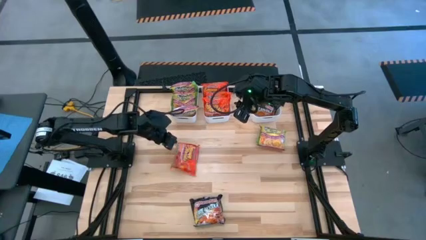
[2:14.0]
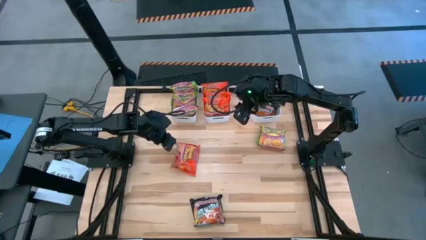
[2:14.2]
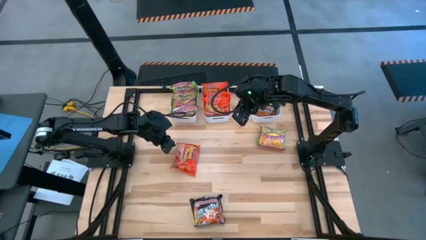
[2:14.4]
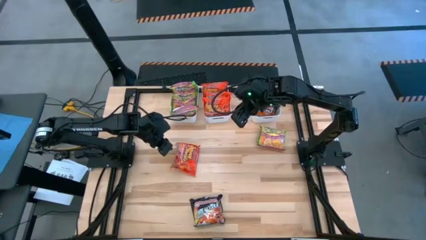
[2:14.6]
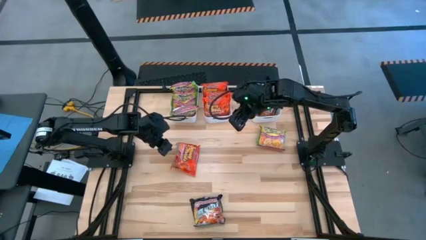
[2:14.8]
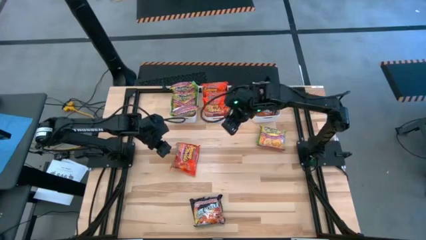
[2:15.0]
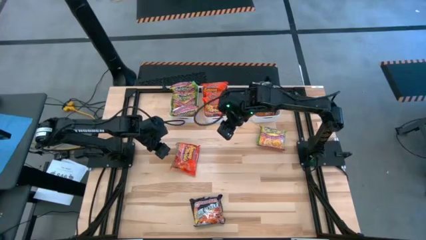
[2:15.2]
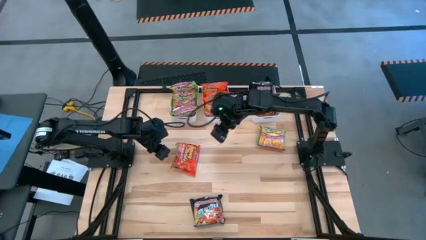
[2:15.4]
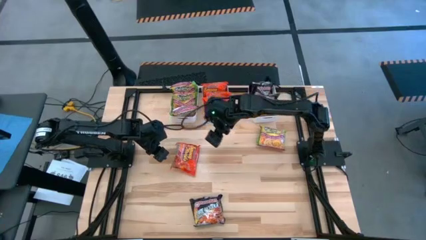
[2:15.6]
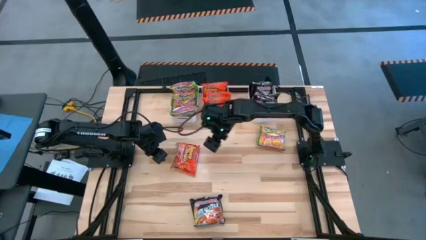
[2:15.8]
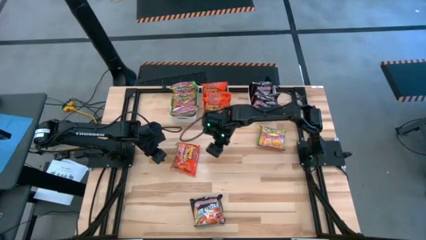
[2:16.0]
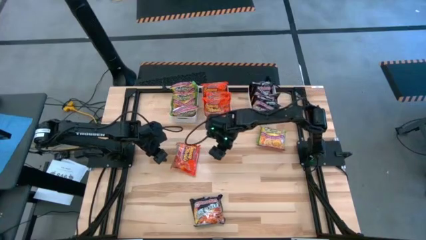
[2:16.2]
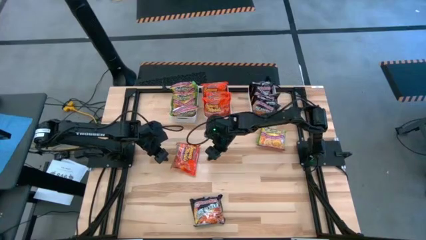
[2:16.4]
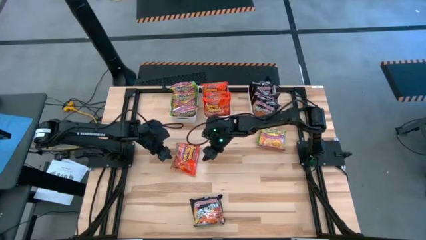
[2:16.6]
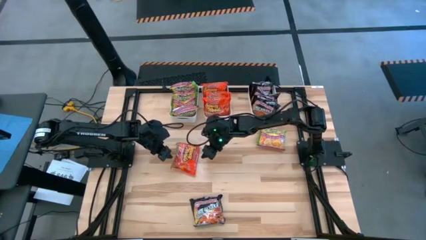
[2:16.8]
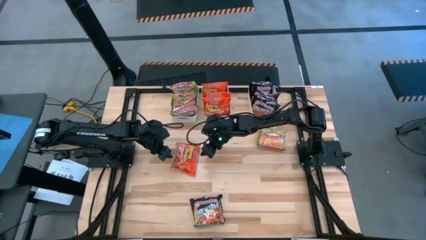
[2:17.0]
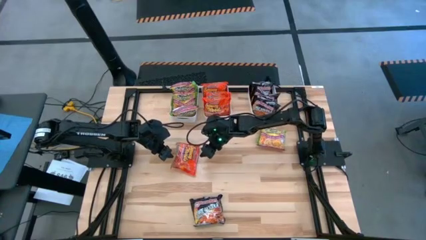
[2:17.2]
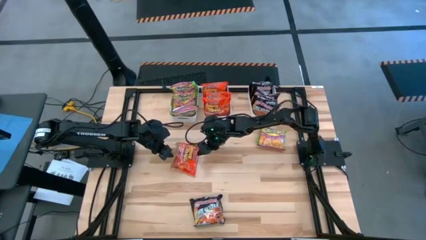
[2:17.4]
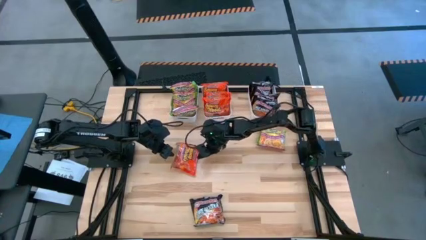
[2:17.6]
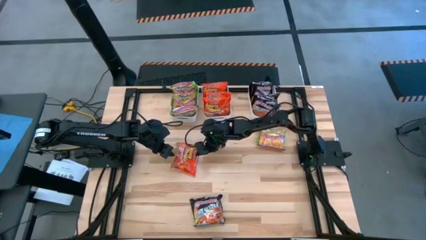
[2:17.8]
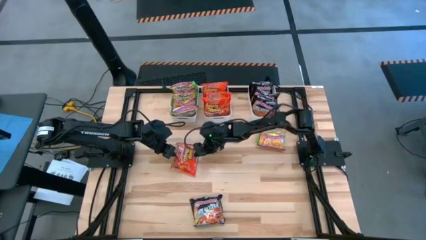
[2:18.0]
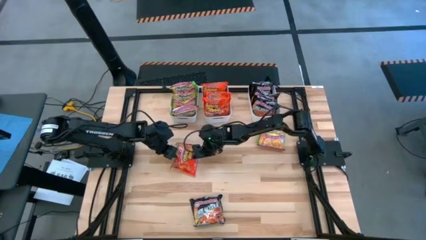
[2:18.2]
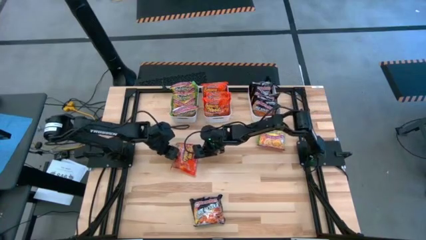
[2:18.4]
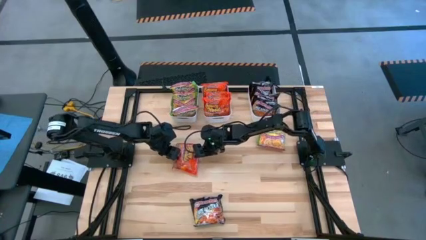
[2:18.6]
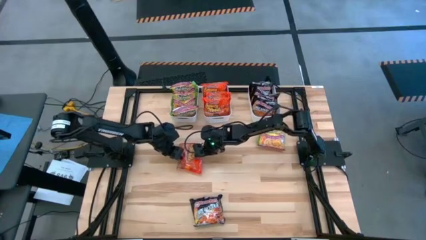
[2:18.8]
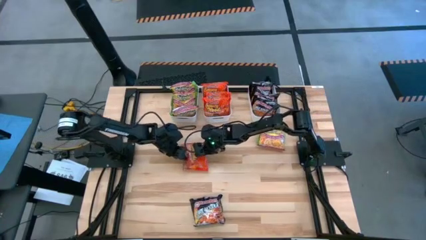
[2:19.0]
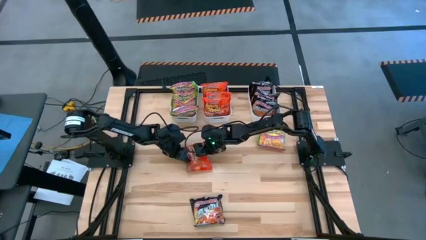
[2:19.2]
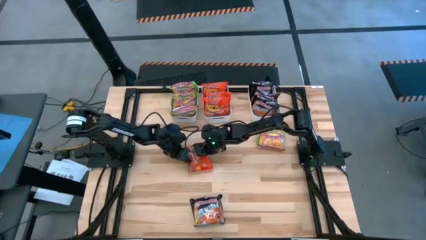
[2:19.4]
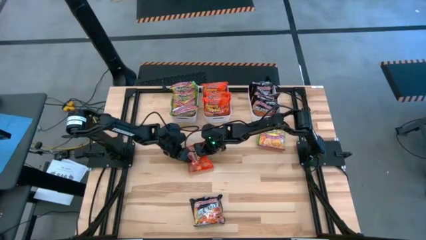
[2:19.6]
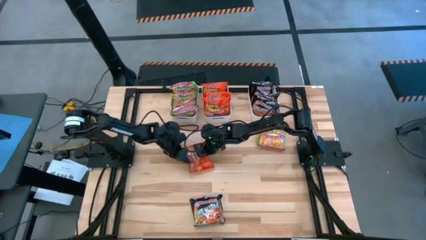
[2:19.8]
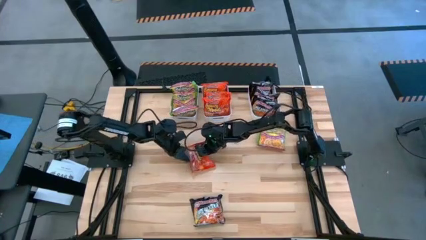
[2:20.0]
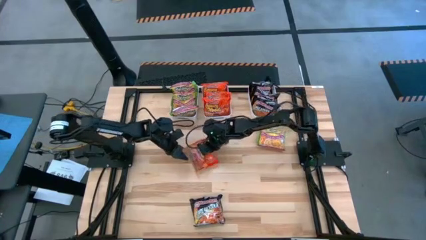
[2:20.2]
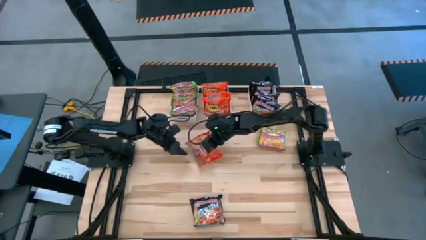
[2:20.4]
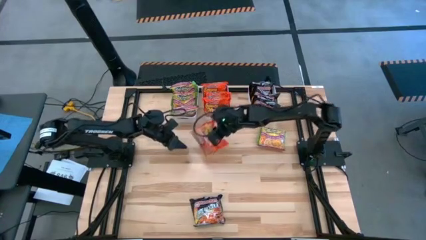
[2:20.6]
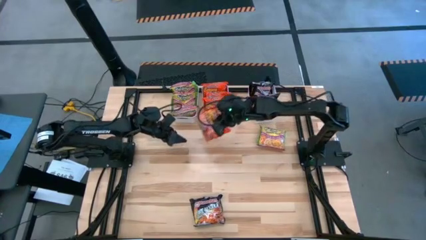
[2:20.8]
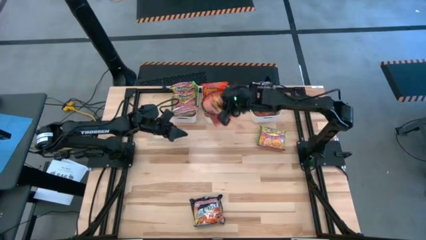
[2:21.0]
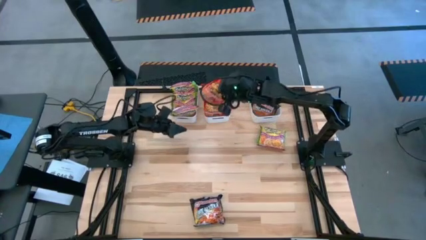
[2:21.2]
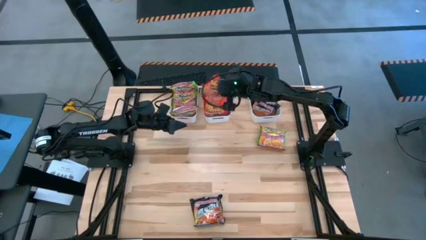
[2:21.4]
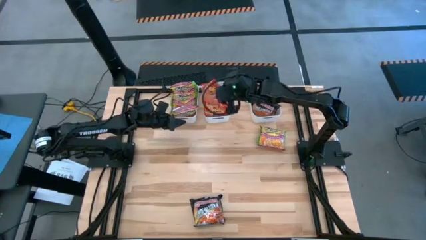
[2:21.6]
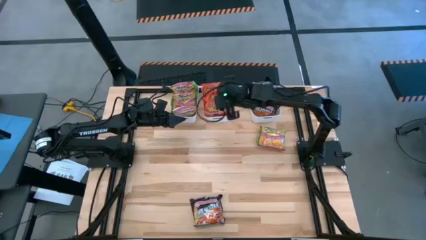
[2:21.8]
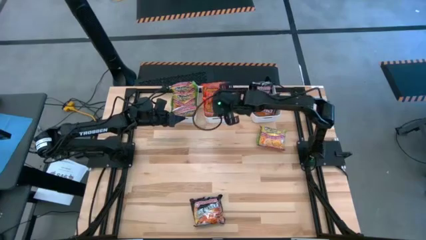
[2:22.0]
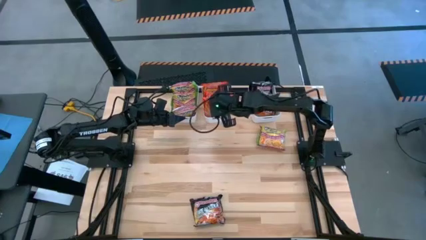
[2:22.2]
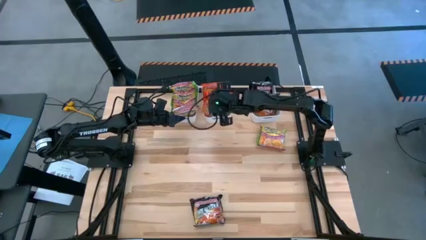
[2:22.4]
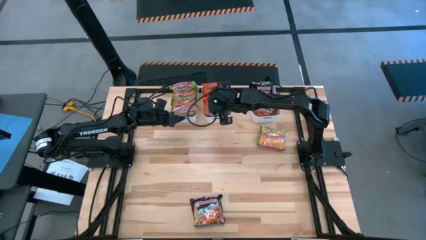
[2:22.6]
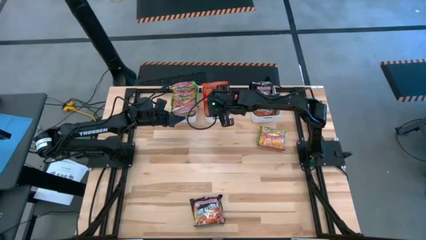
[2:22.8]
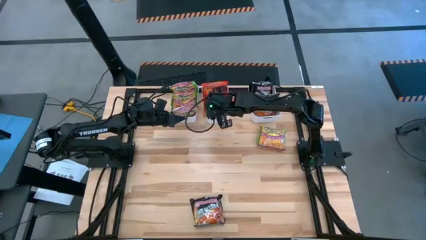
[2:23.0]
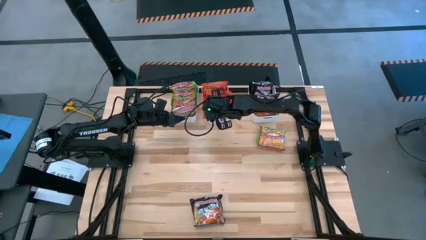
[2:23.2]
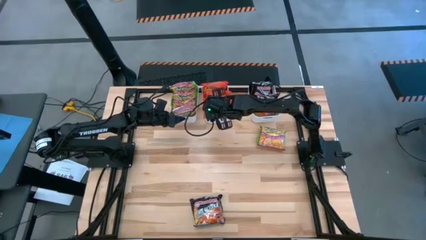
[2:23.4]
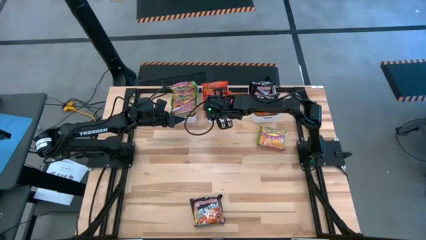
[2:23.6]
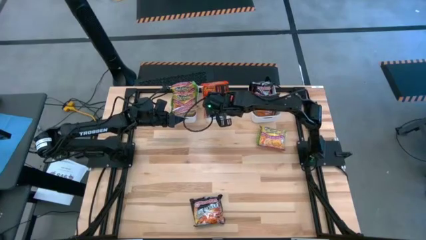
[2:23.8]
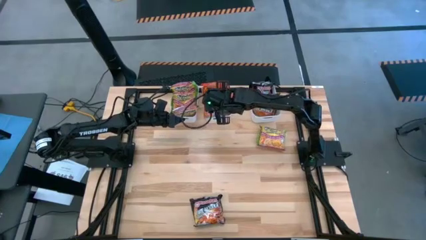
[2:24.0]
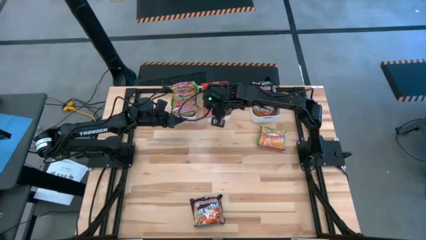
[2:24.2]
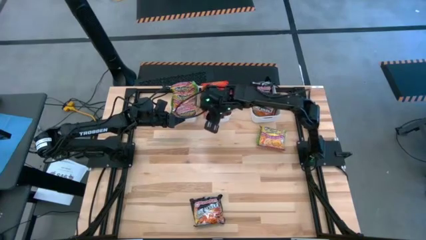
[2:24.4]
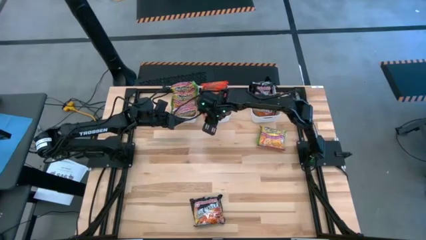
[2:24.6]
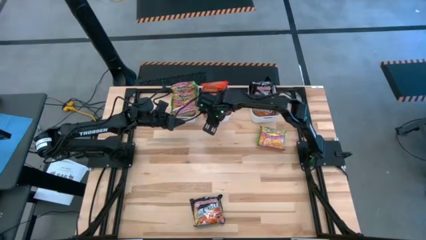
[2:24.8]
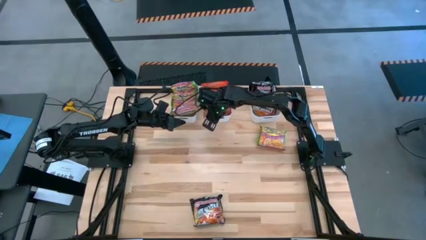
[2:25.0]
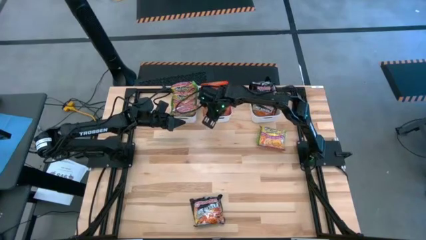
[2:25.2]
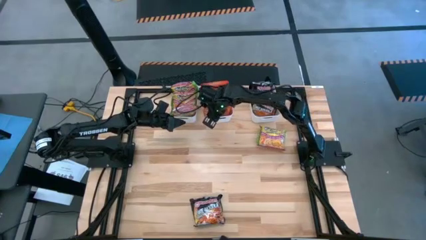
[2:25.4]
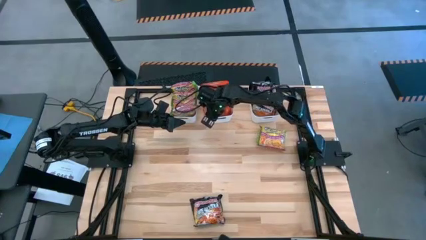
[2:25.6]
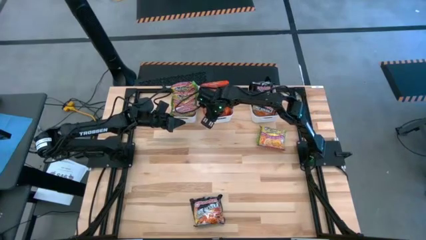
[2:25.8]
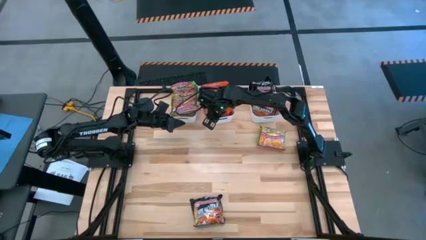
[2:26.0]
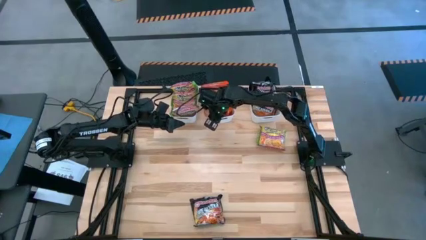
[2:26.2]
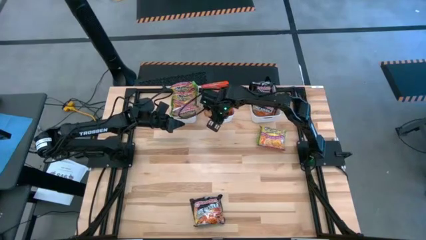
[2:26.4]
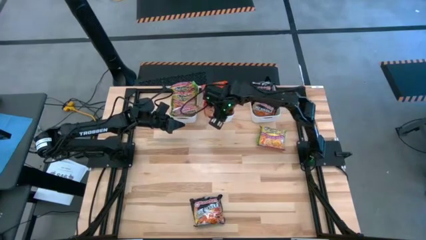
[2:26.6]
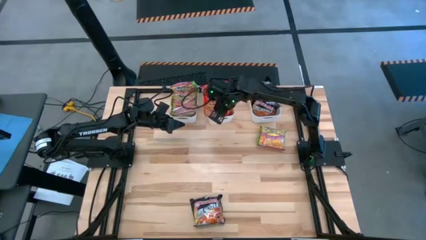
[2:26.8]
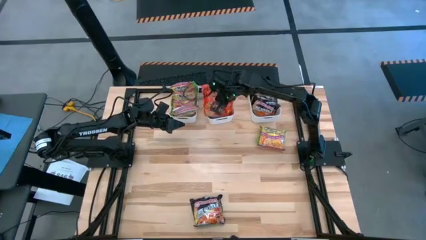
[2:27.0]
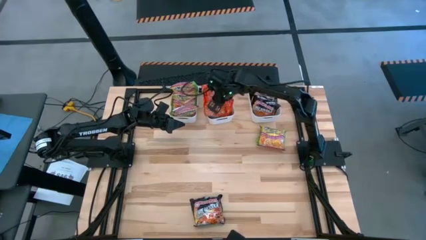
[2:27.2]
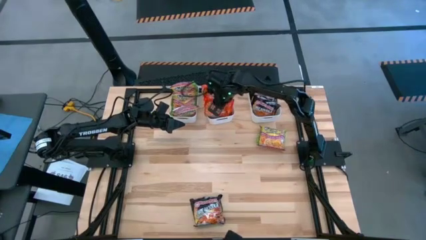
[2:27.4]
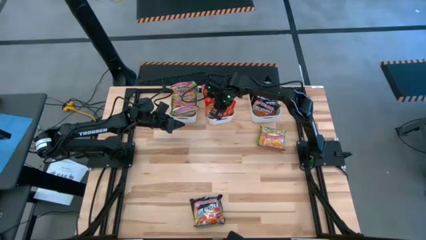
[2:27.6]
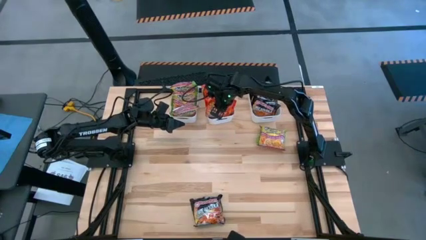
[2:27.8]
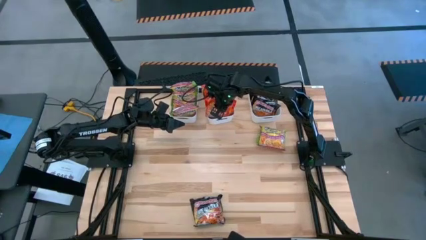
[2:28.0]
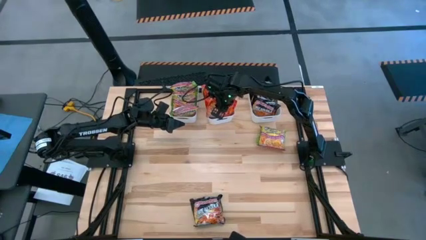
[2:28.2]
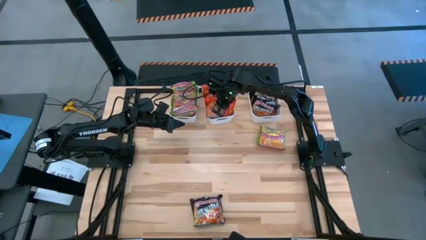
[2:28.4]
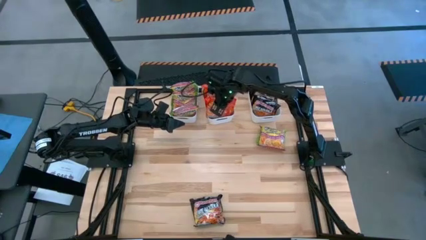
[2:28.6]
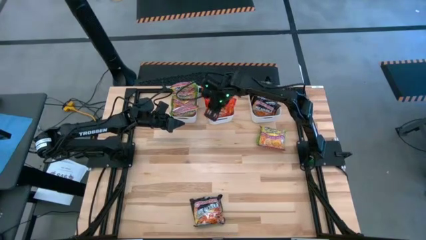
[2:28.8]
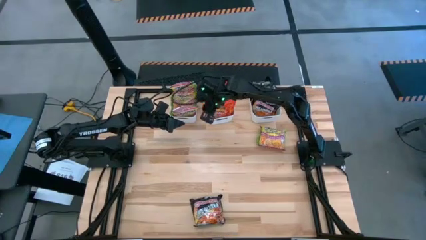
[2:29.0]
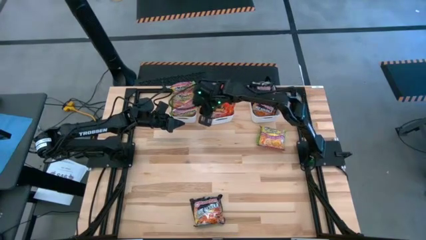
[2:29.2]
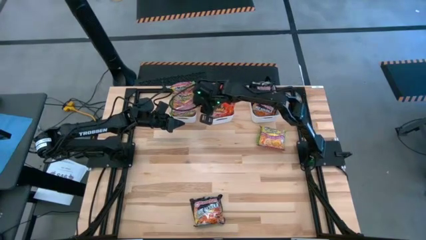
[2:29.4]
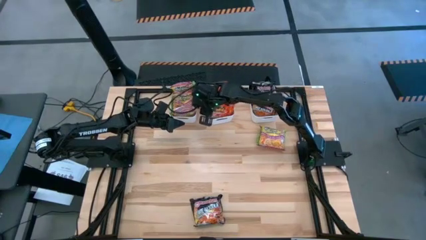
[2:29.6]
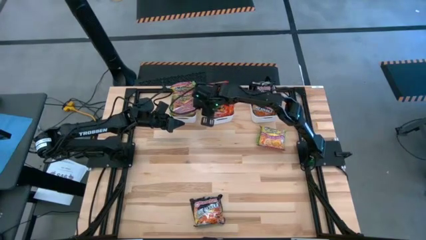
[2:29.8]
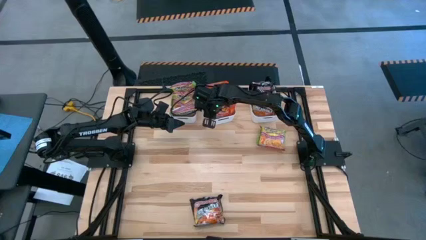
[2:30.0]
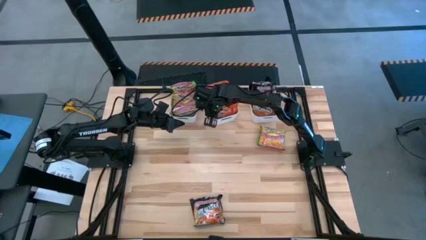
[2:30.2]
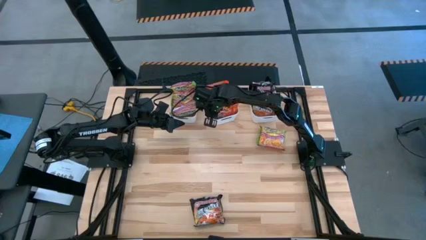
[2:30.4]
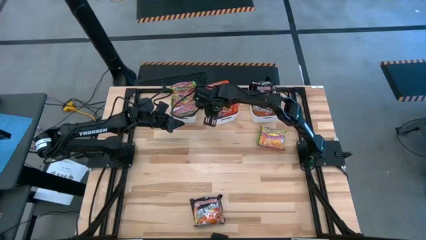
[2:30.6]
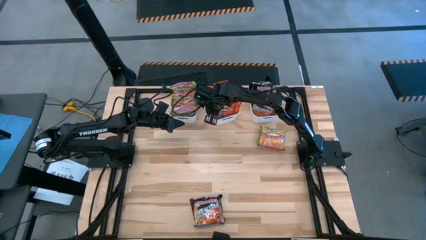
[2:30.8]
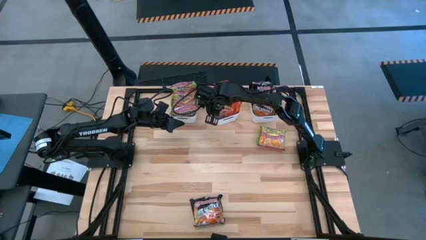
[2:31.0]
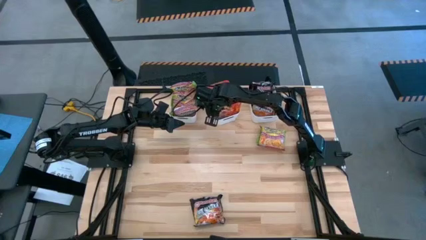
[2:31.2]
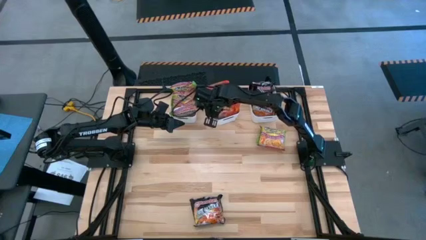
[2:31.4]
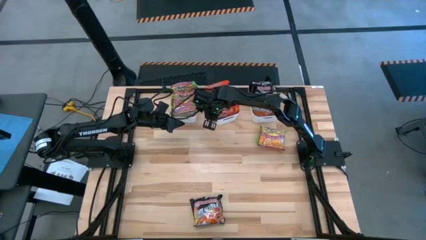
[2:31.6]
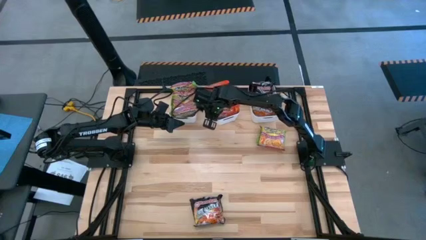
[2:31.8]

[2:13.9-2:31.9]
Task: Sort Maruchan noodles
Put the orange noodle pack into the middle white bin
